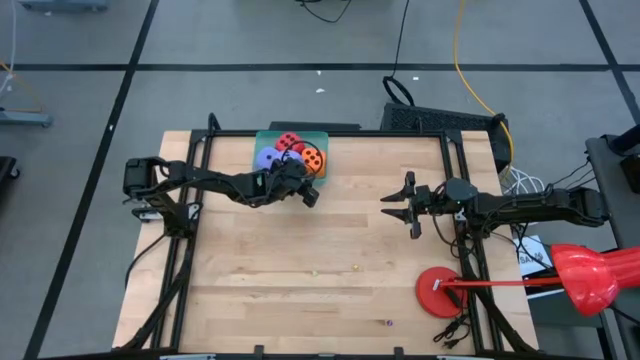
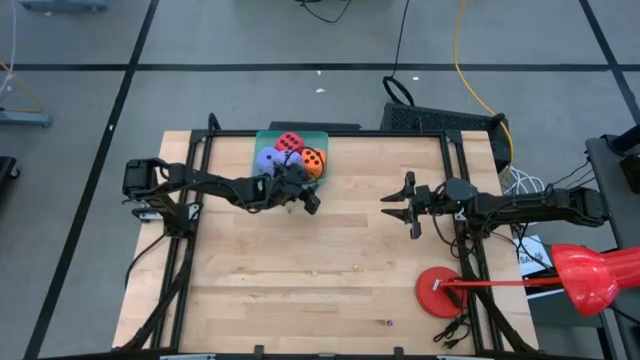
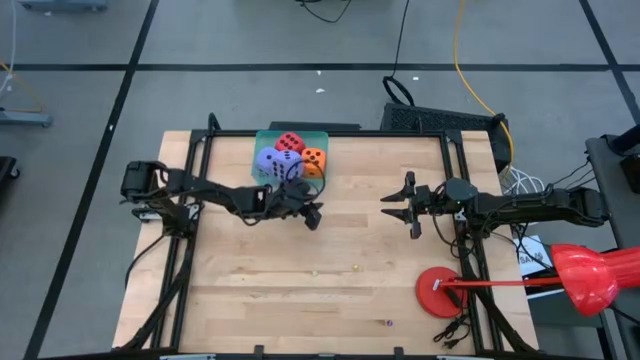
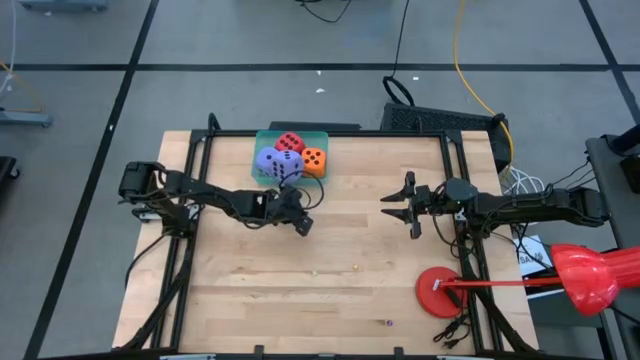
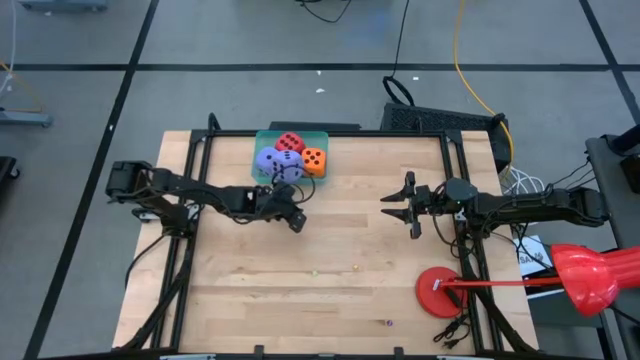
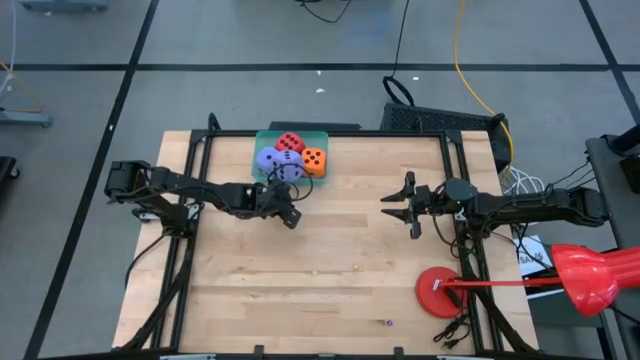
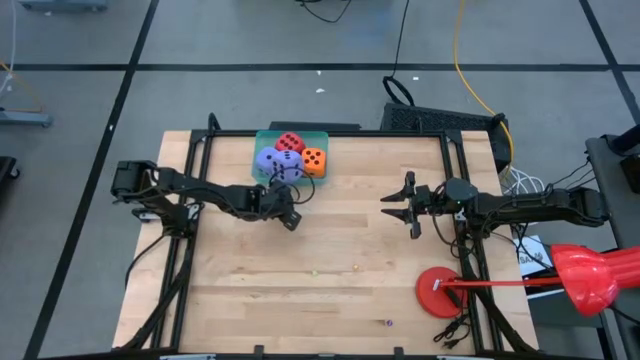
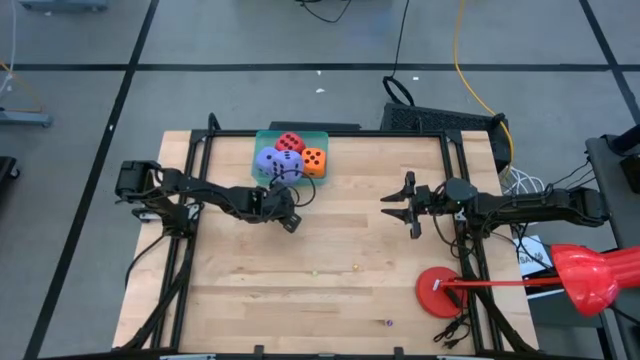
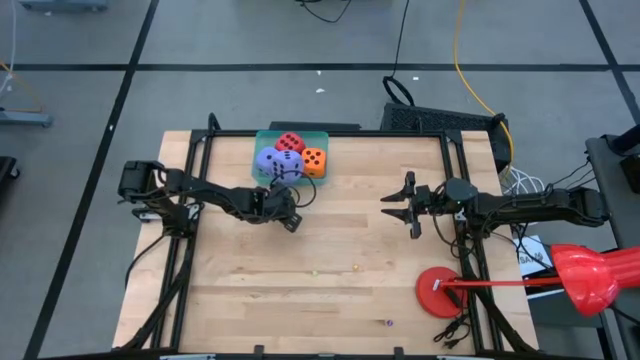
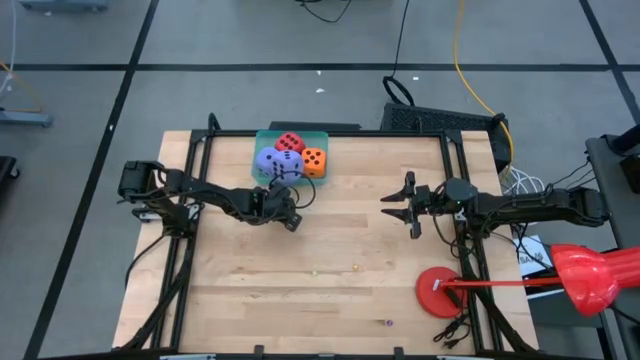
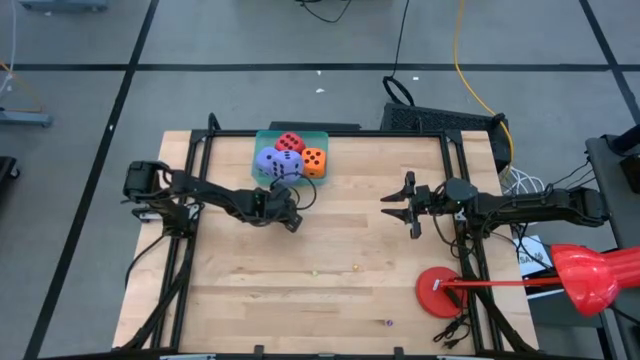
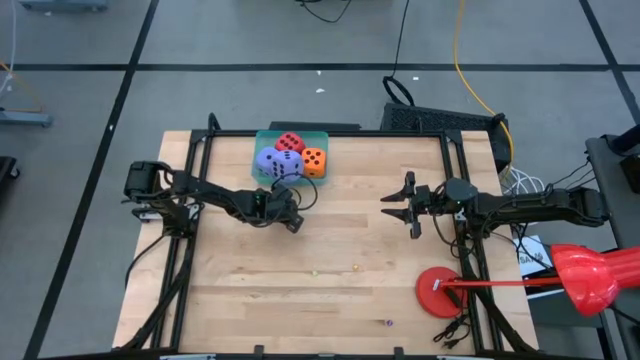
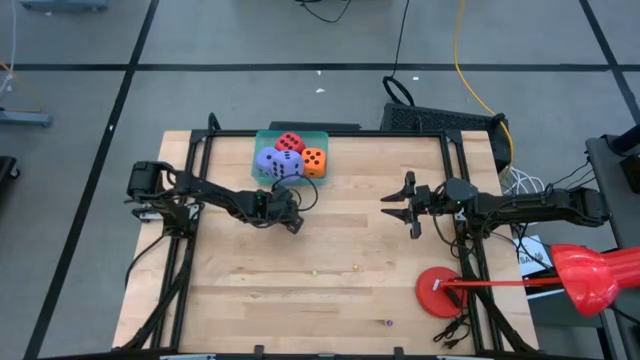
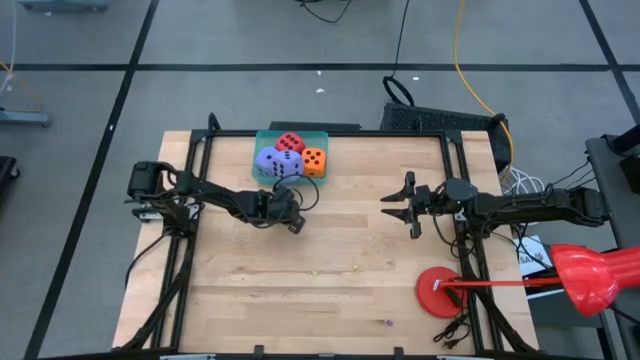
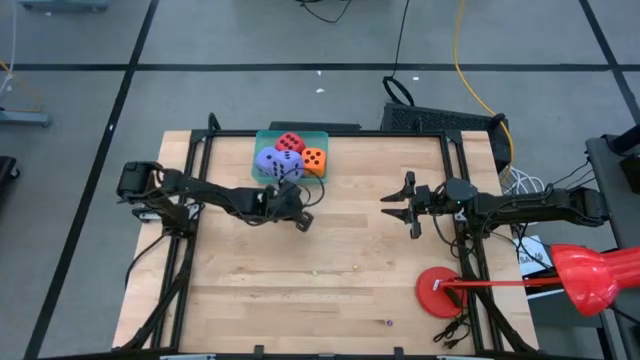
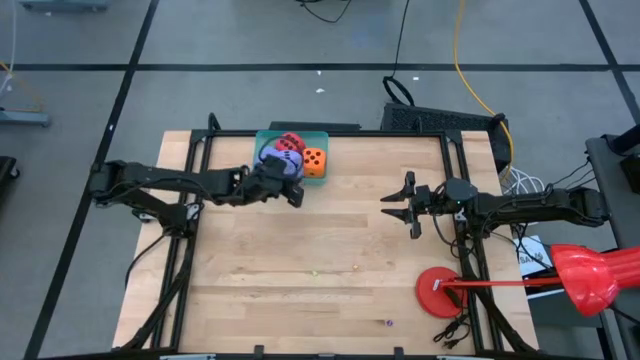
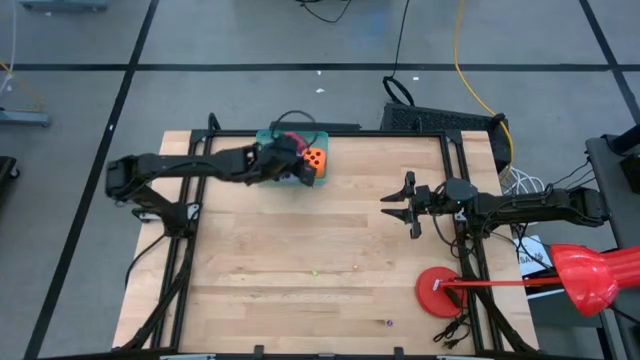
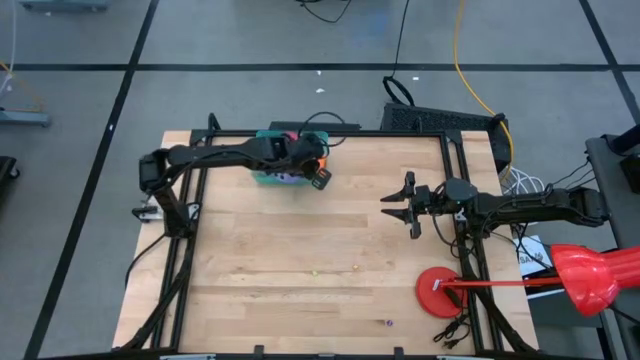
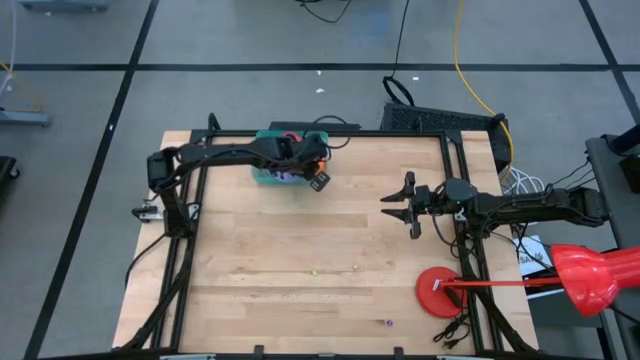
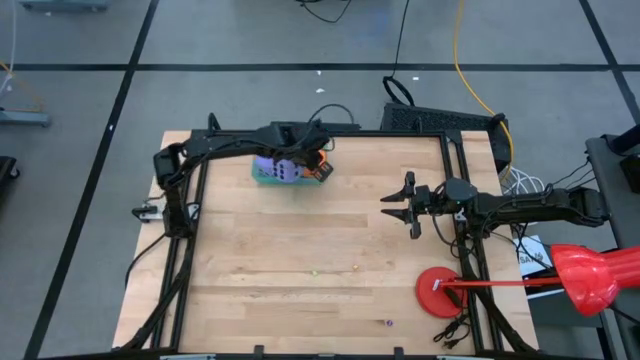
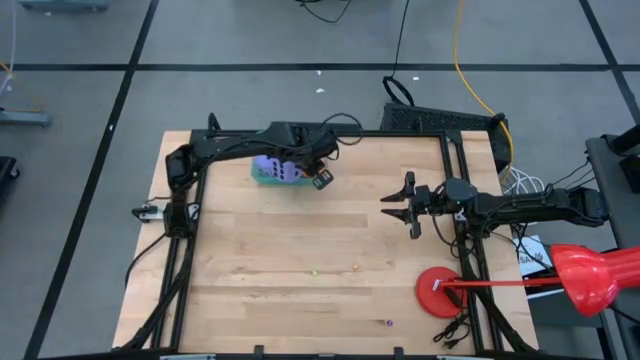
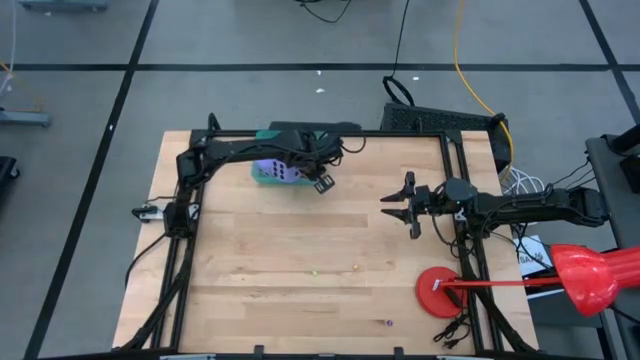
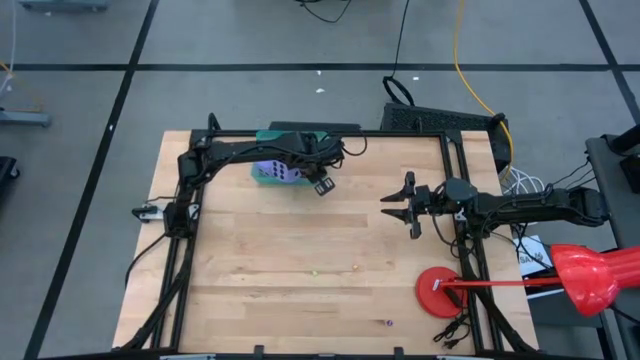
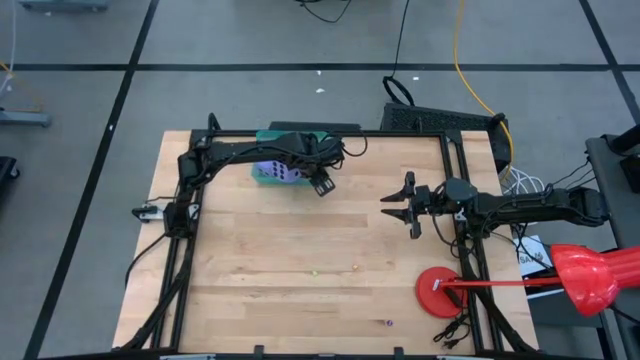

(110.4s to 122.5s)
Task: Pick & Place Dice
Put the small green dice into the green bin

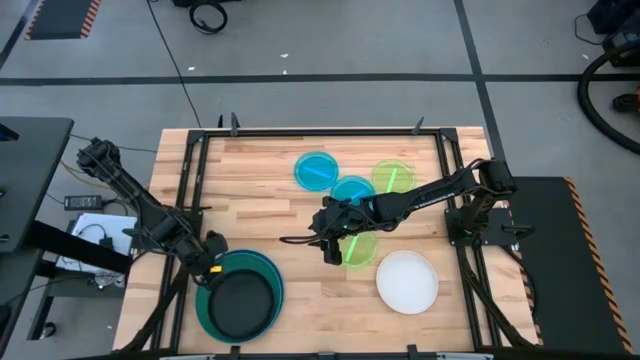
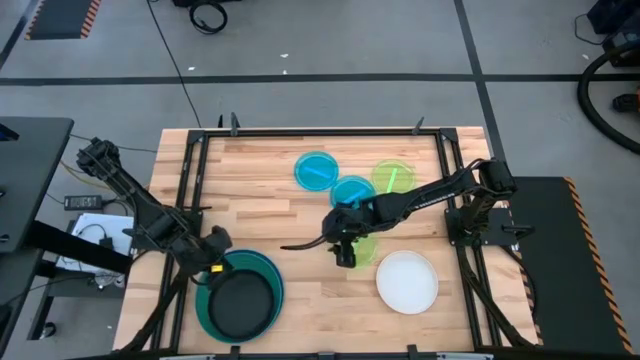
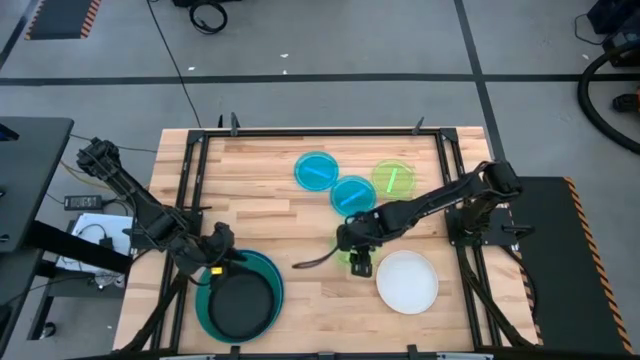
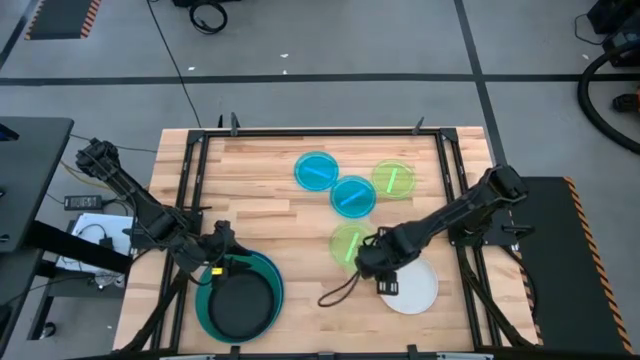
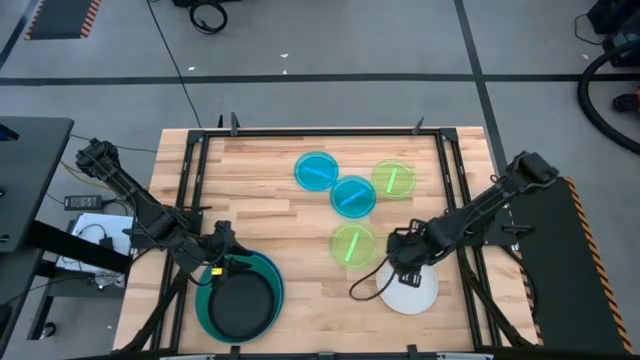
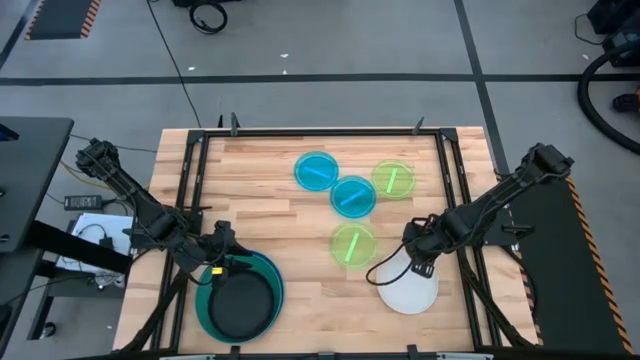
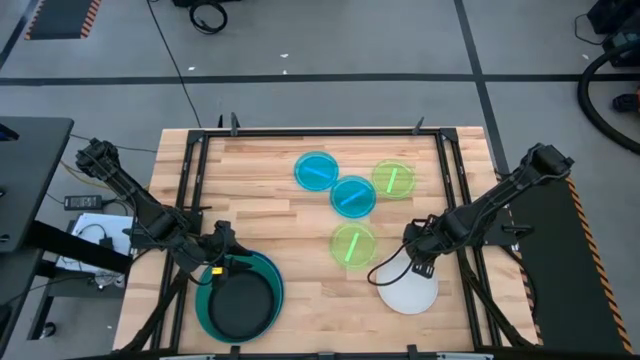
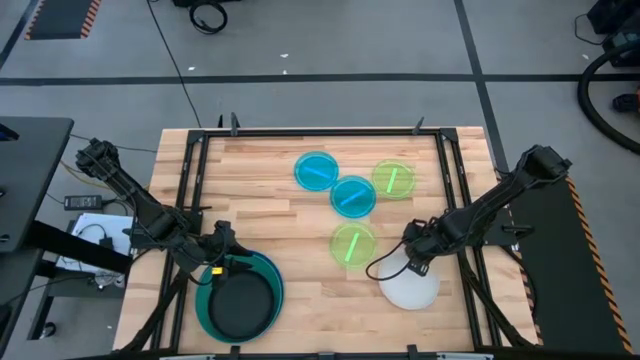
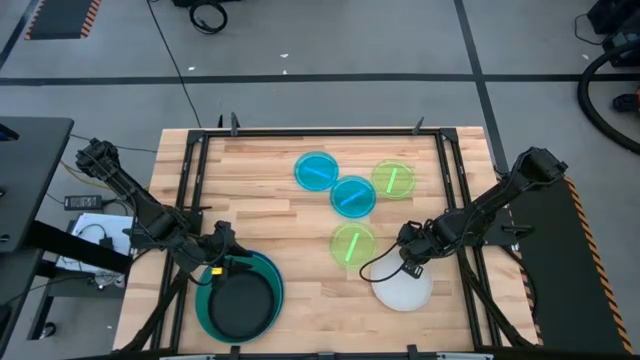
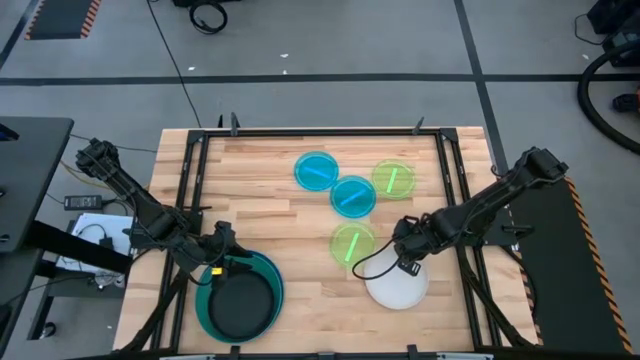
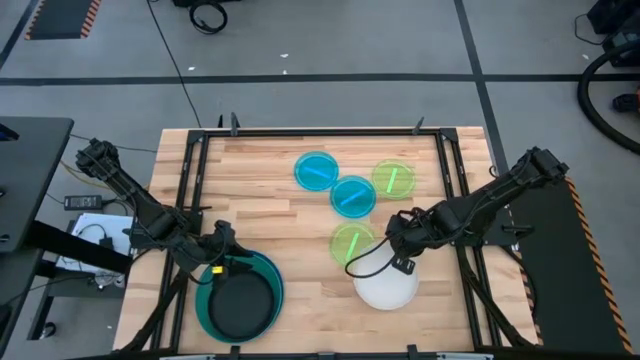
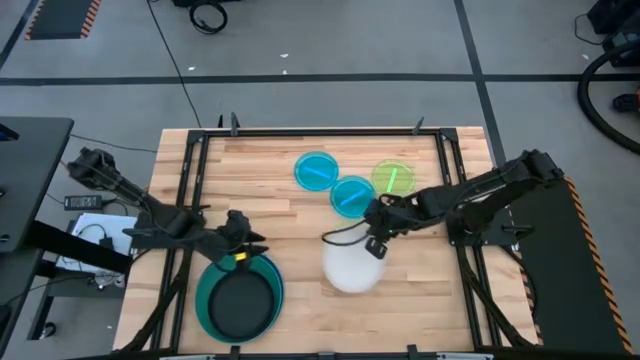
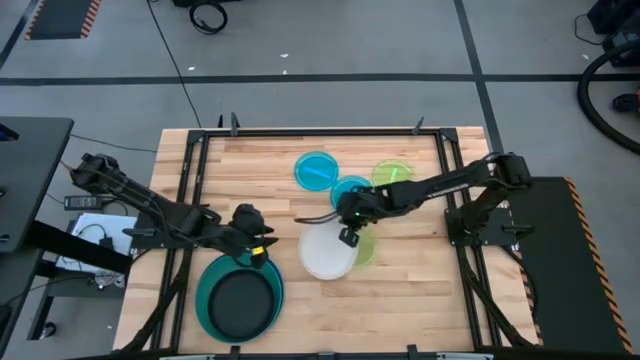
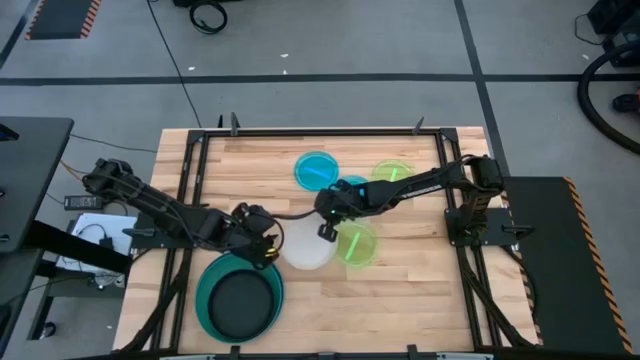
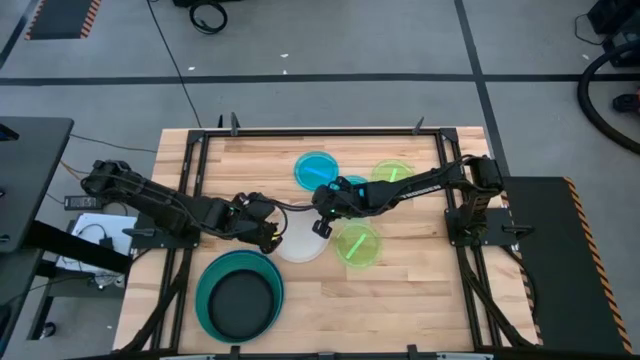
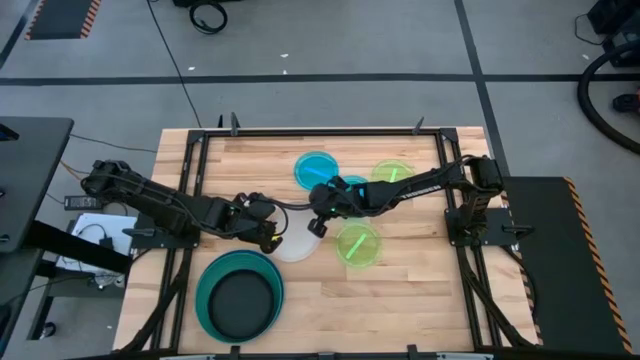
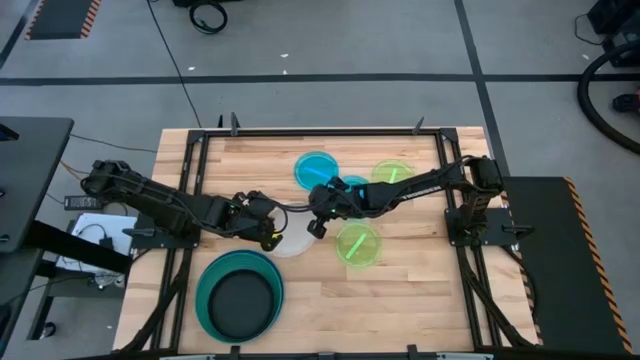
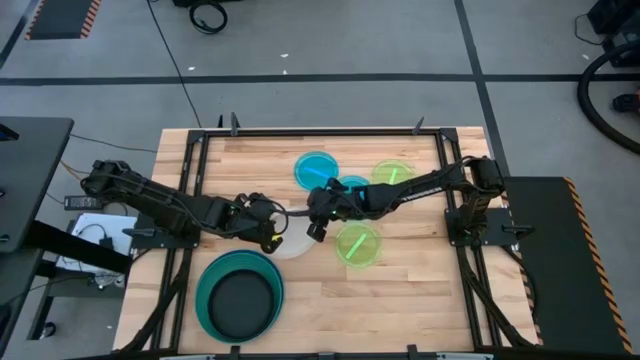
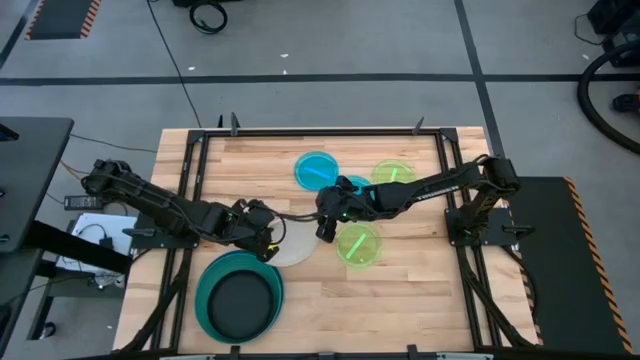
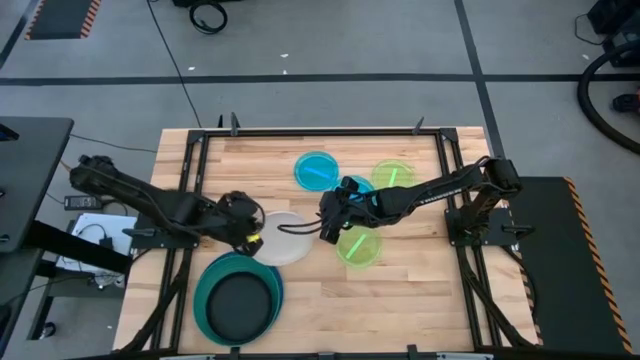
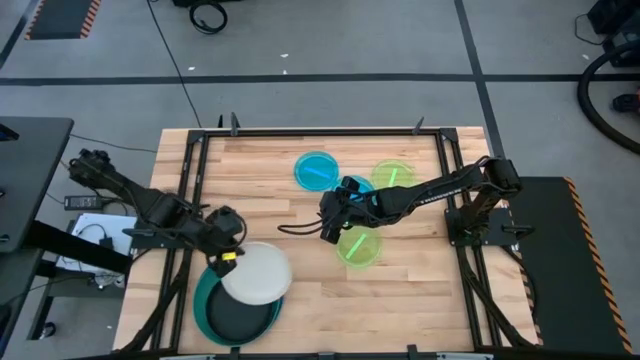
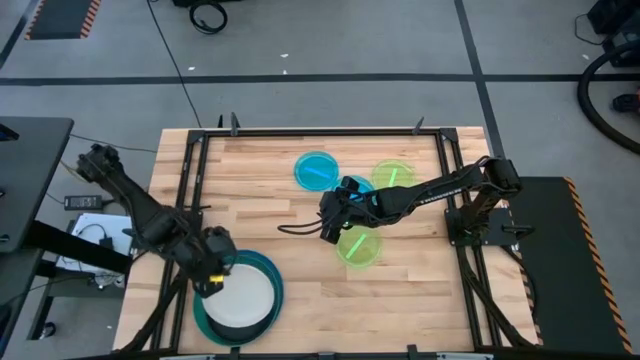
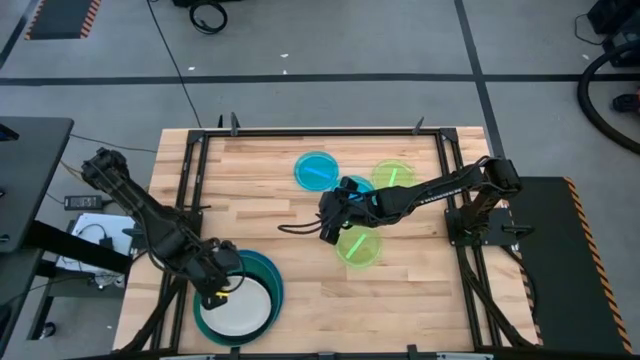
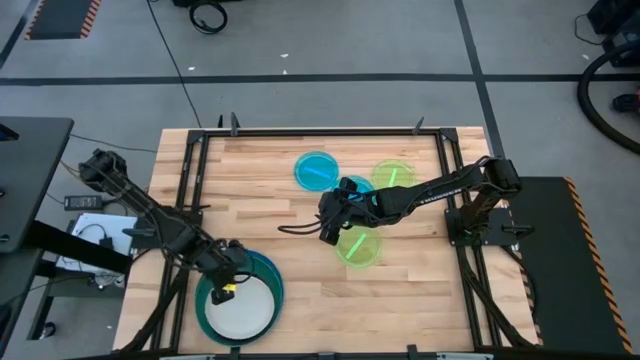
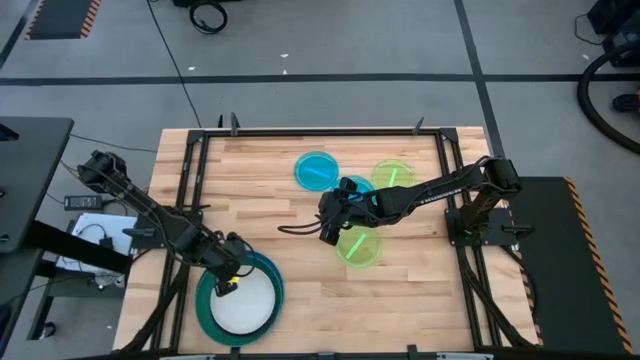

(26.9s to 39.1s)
Task: Stack plastic plates
Stack the white plate on top of the black plate
